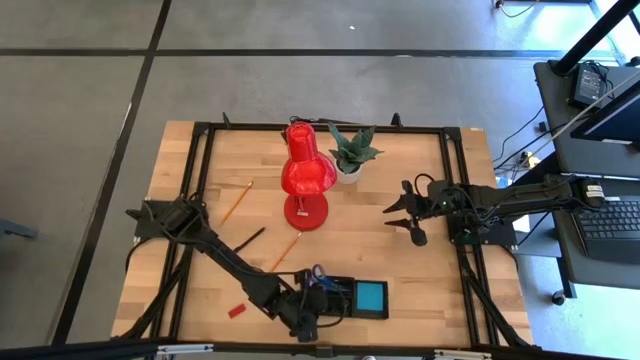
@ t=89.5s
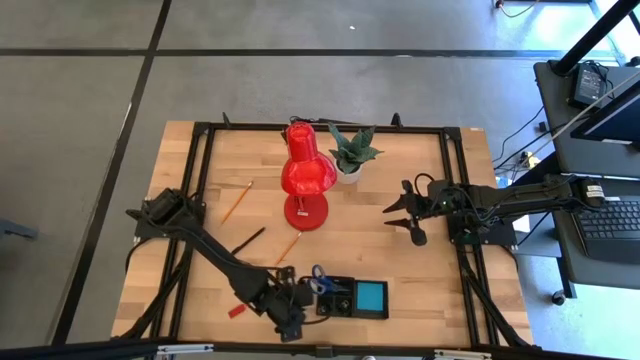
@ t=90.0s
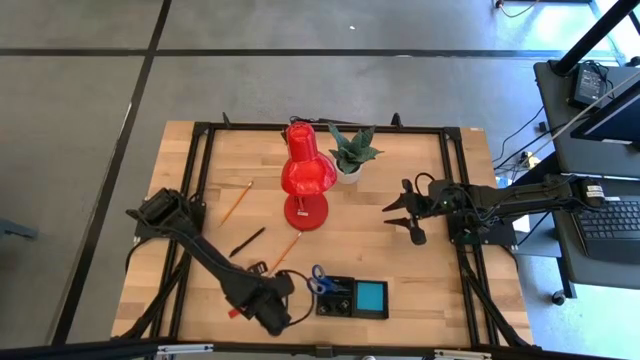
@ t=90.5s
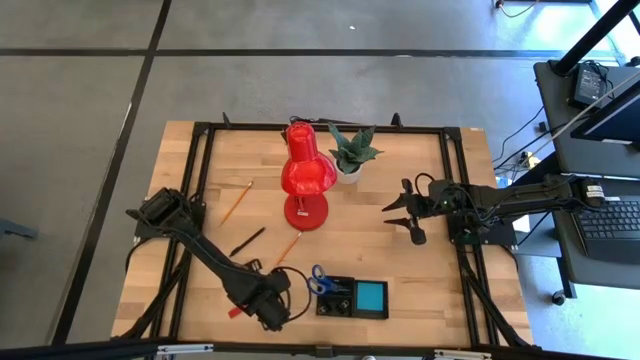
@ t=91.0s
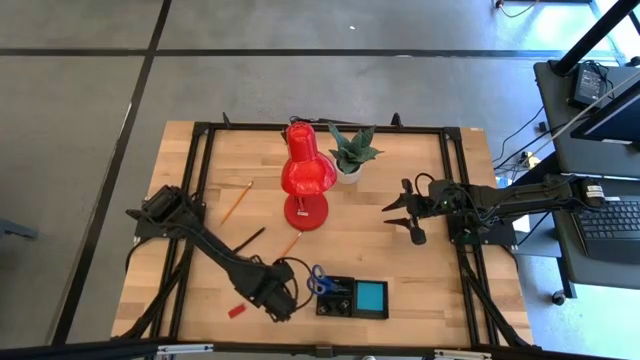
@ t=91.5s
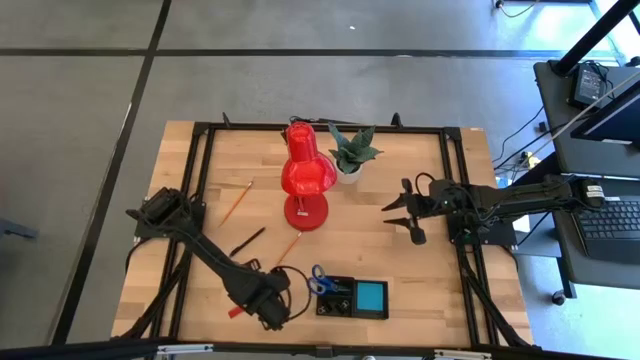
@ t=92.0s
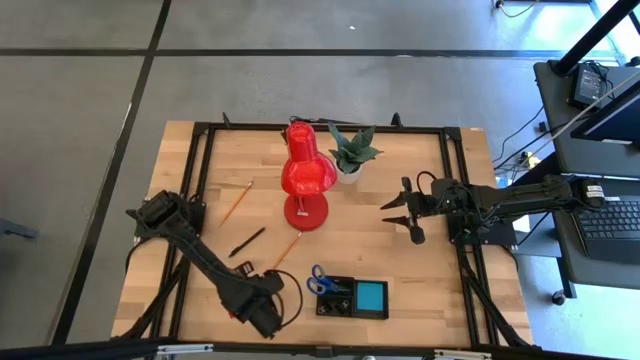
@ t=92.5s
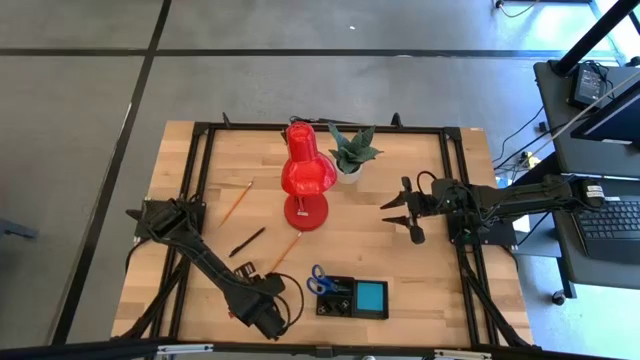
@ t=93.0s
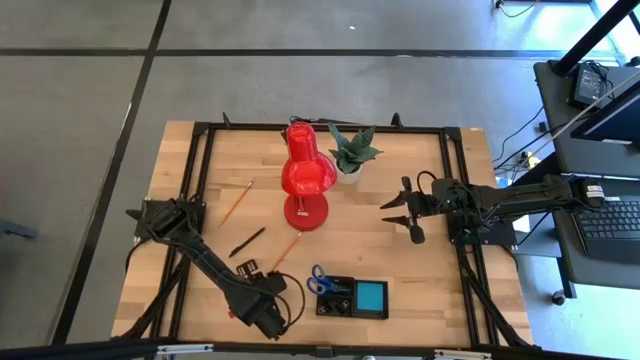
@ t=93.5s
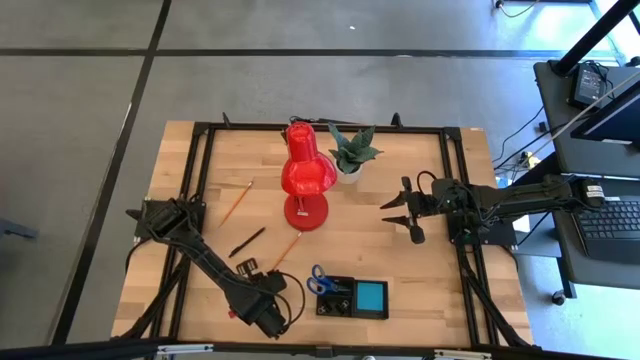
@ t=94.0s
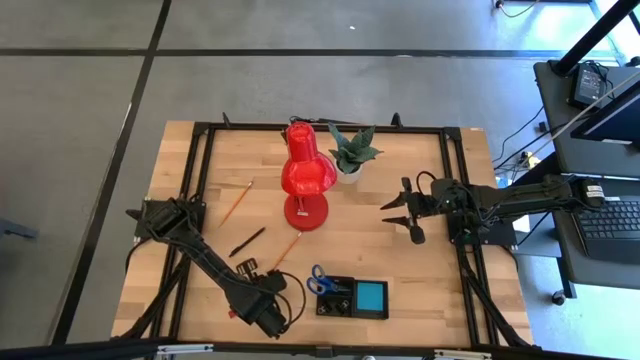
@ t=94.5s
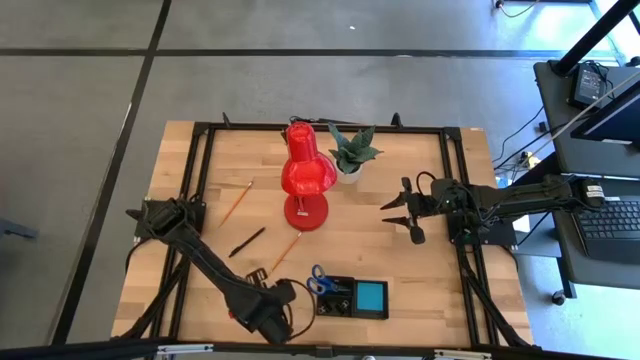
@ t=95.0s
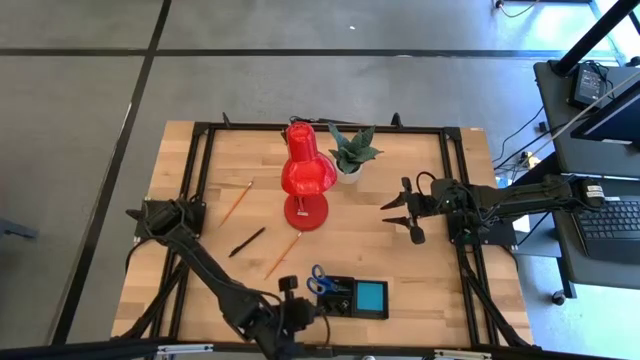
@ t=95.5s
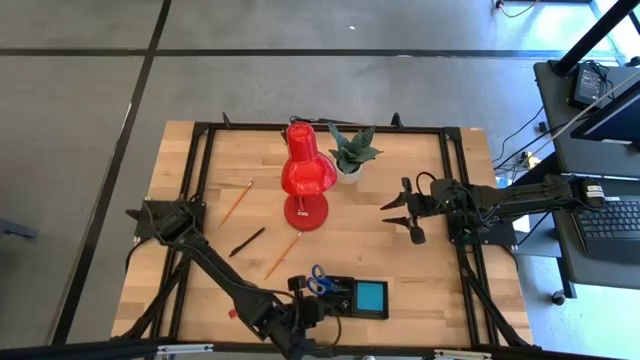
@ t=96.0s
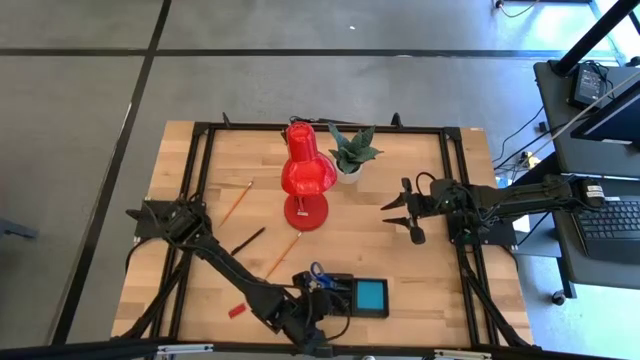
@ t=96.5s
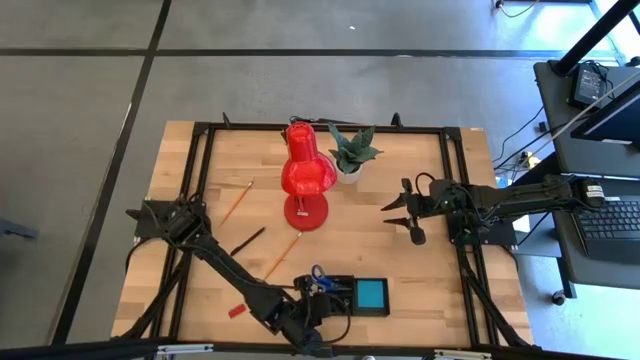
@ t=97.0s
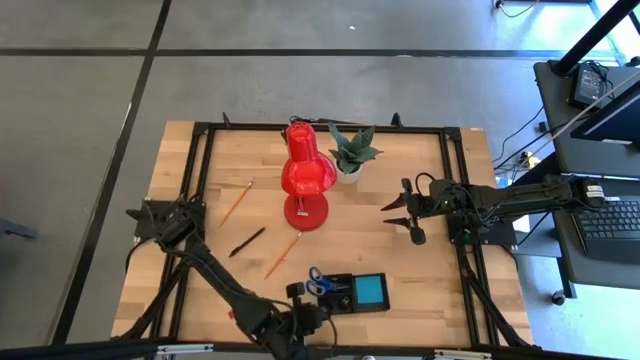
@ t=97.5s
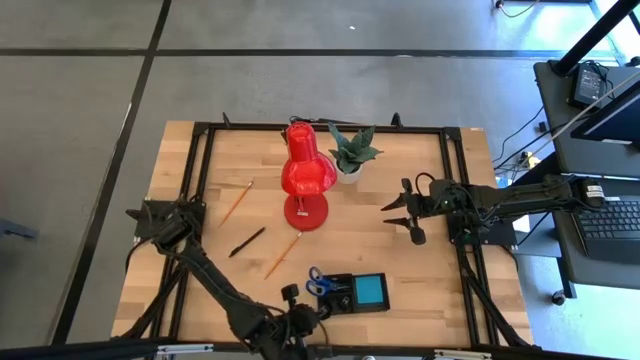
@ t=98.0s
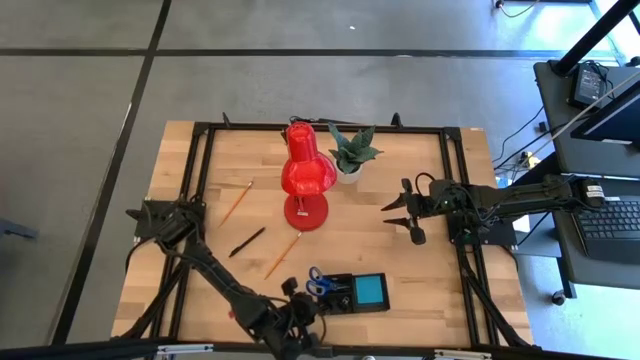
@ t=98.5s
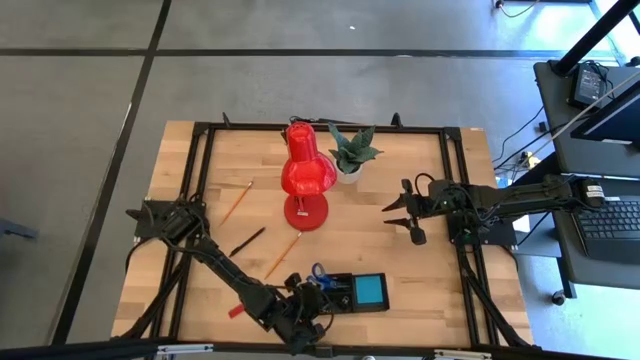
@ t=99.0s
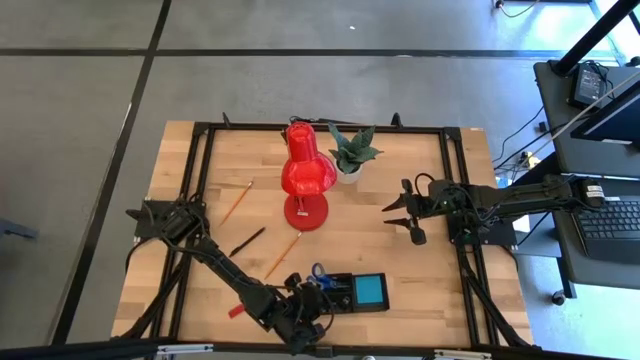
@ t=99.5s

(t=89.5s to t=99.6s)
Task: Pick and place office supplies into organizer
Put the black binder clip into the black desk organizer

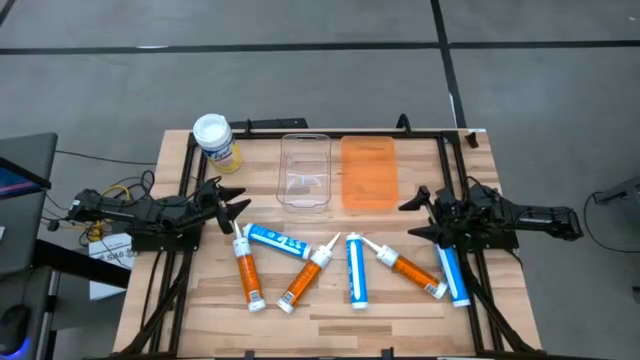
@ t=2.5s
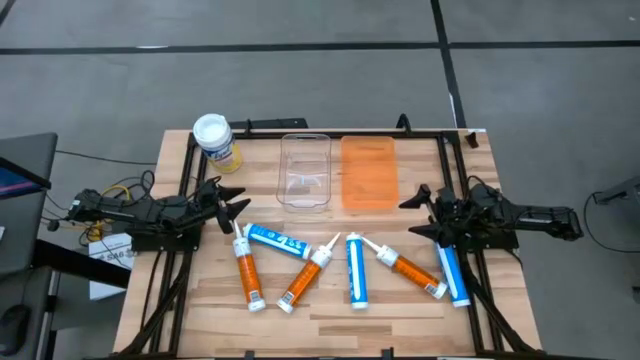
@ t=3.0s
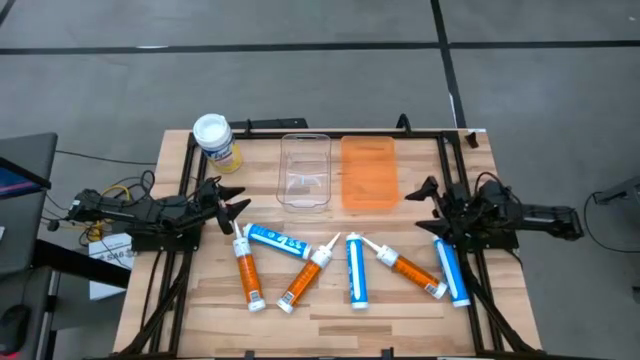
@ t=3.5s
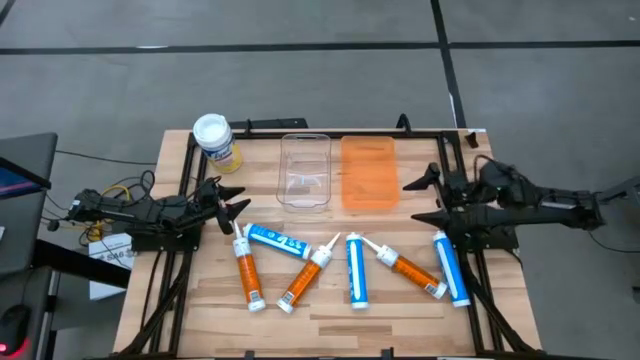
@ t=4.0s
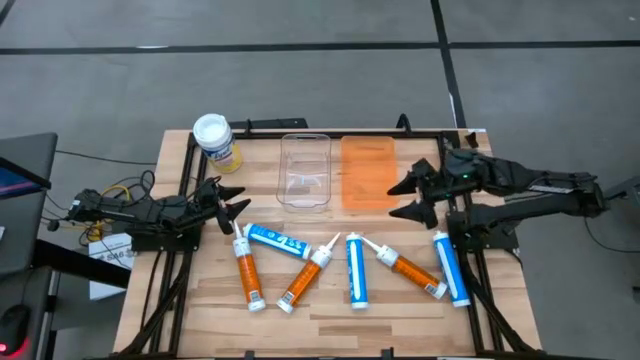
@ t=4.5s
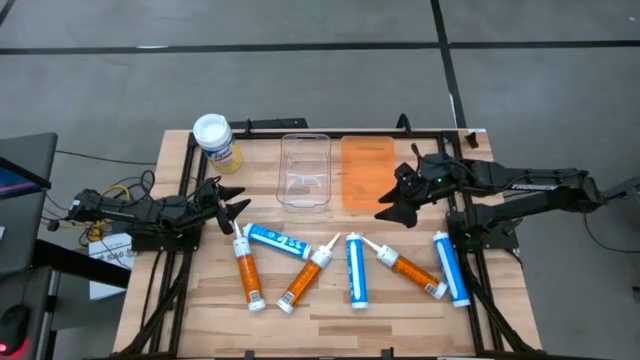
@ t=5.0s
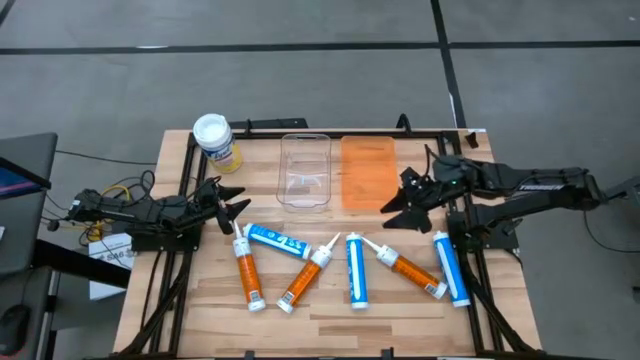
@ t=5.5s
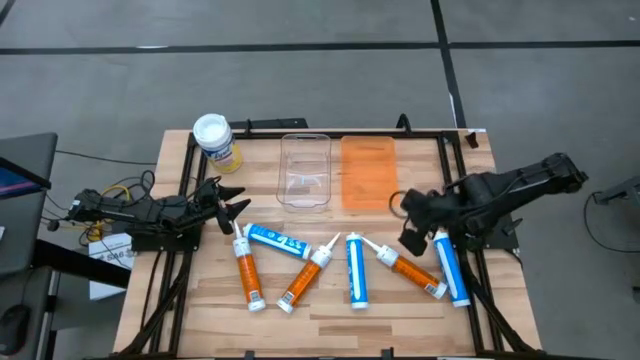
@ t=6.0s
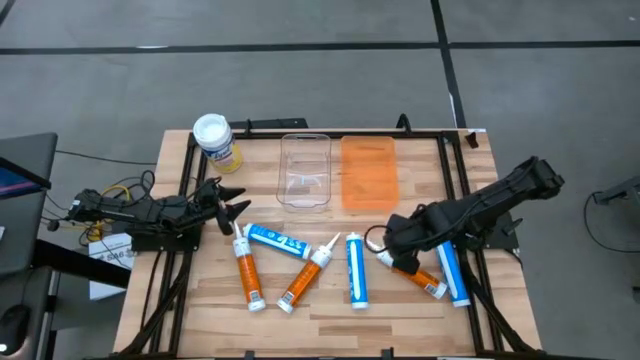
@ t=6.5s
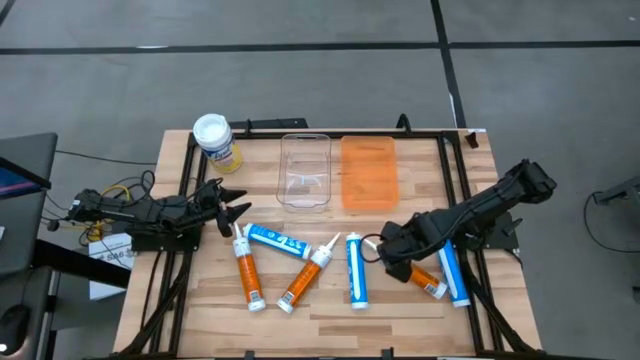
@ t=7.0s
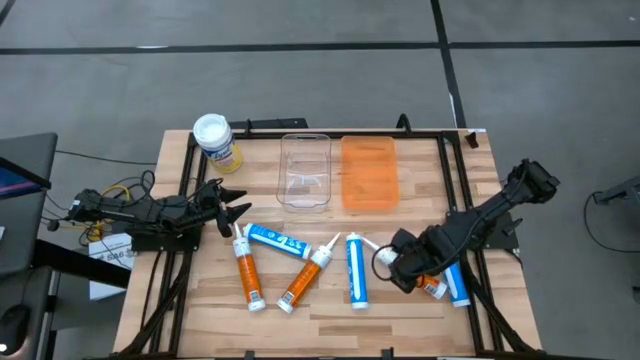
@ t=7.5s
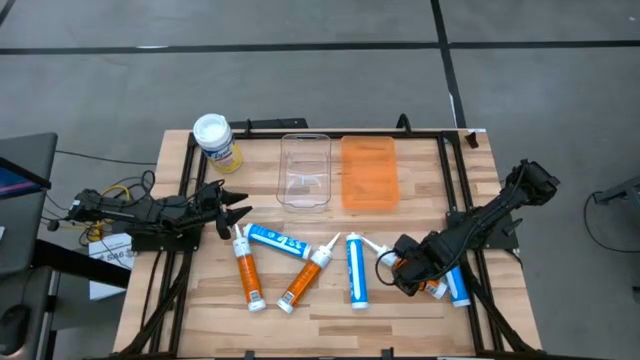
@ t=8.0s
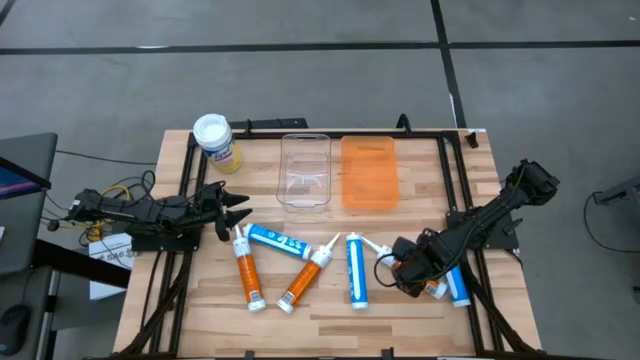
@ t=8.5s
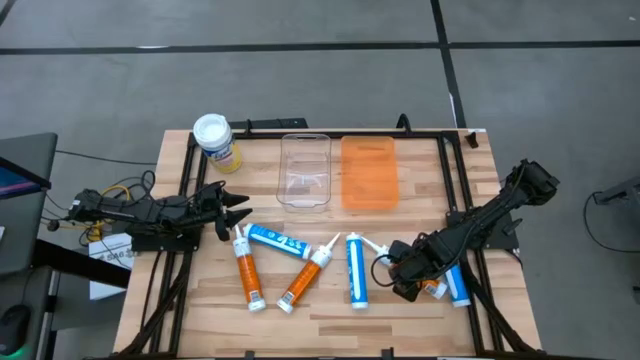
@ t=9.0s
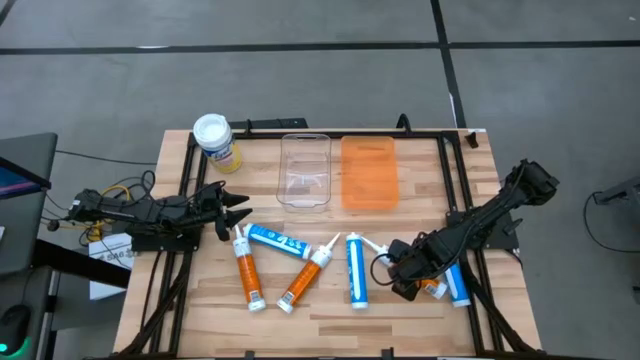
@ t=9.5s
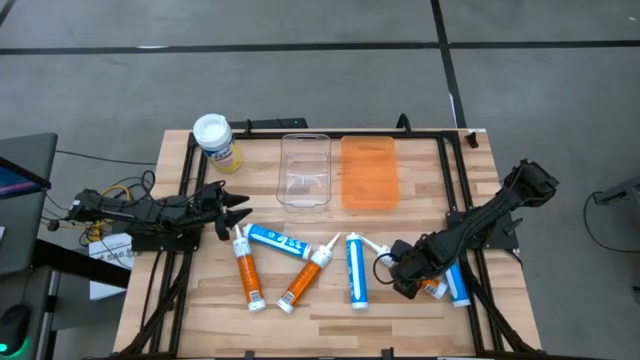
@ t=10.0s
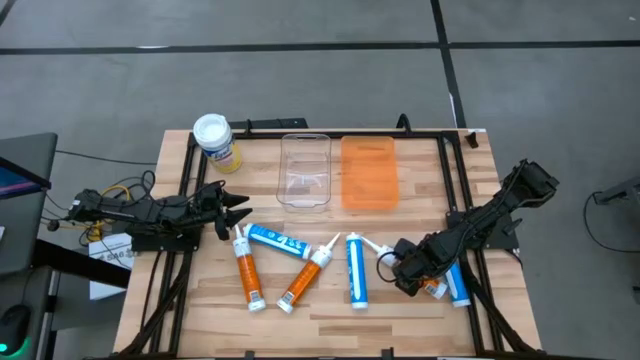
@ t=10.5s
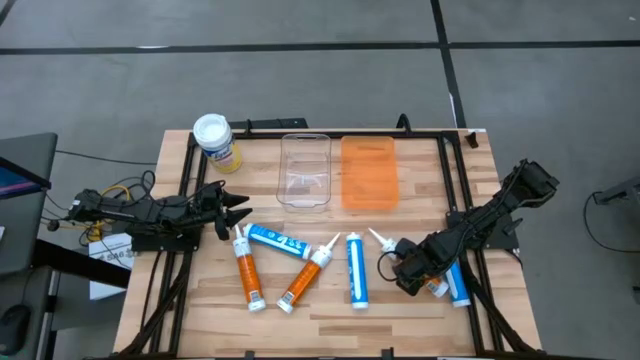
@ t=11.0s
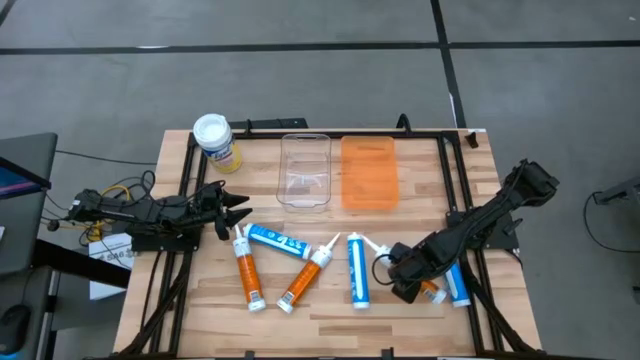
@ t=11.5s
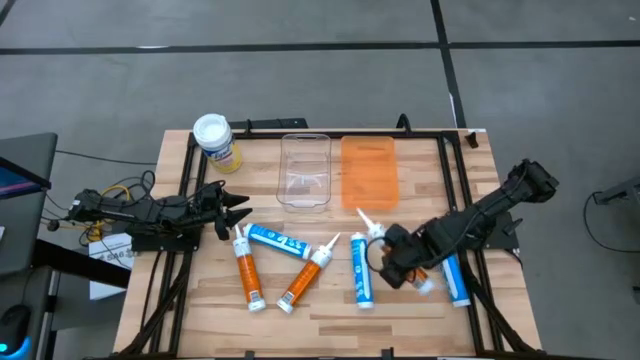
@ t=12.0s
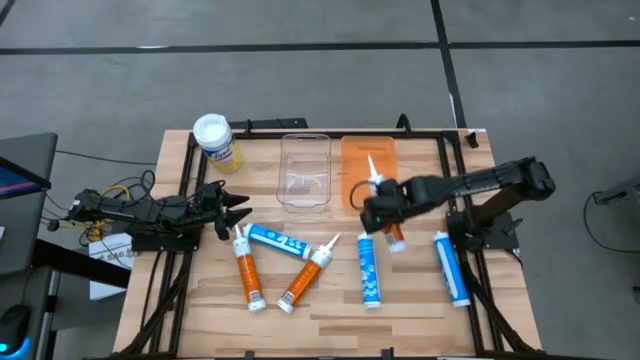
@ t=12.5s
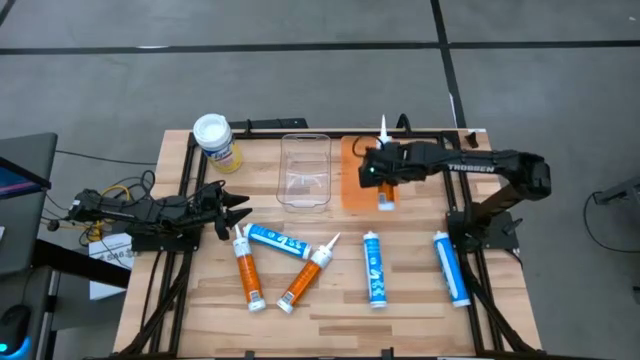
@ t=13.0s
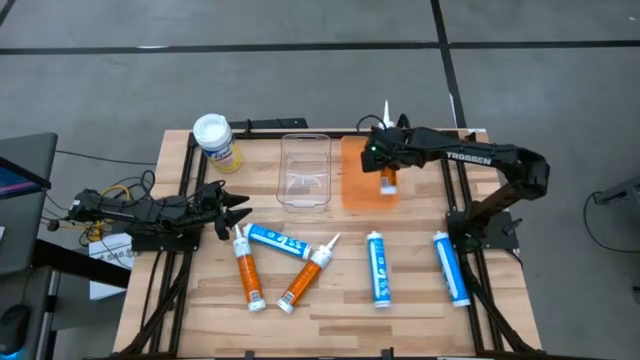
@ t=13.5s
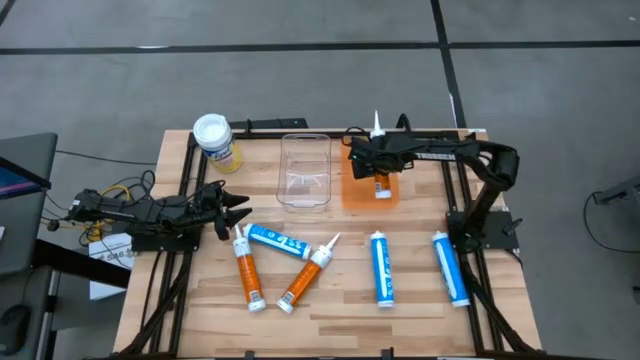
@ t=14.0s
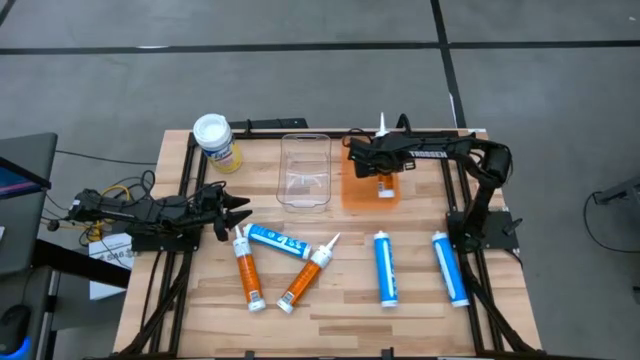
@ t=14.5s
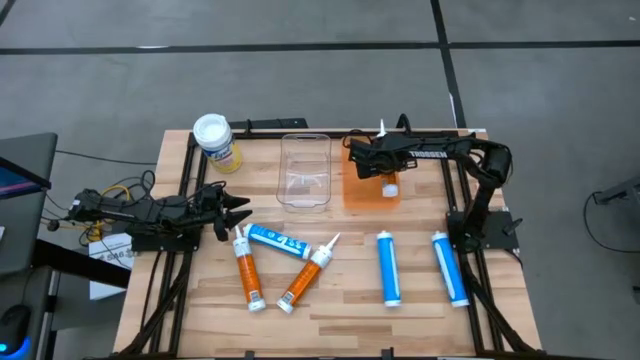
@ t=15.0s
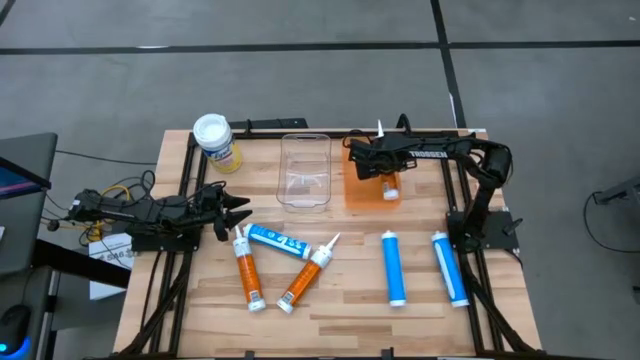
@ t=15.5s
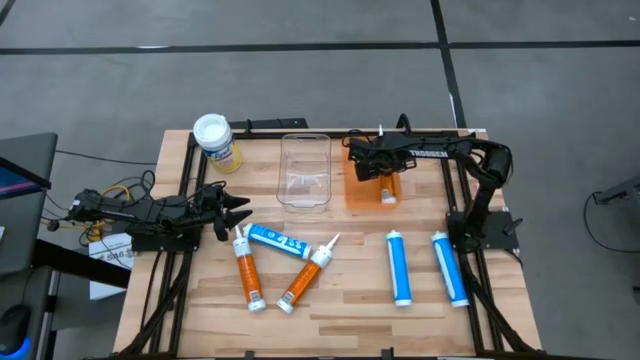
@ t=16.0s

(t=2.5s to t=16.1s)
Task: Pick & place silicon tubes, Sealant and Lysol wipes
Put the right orange sealant into the orange bin
